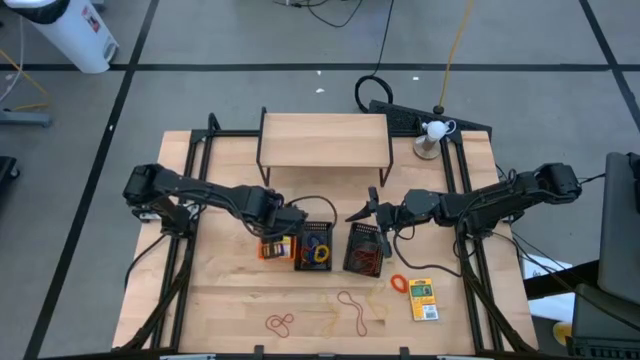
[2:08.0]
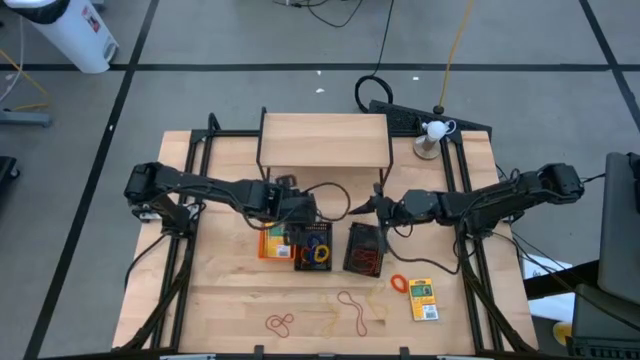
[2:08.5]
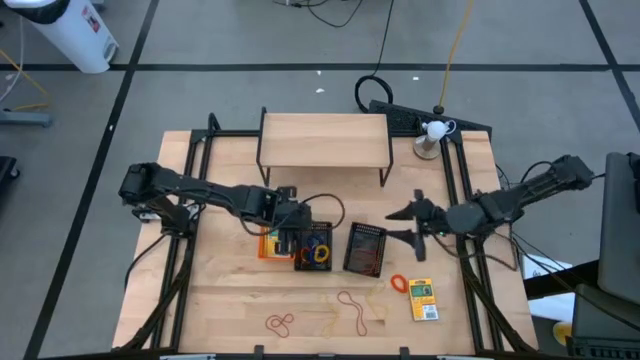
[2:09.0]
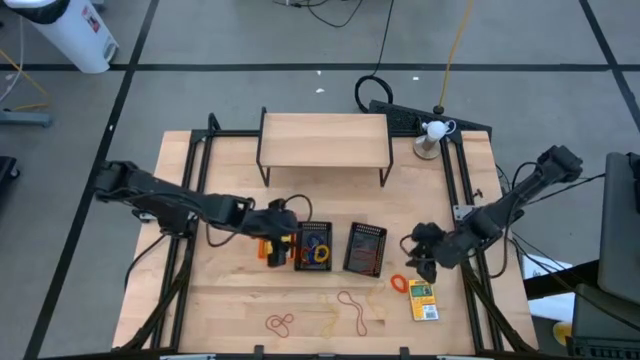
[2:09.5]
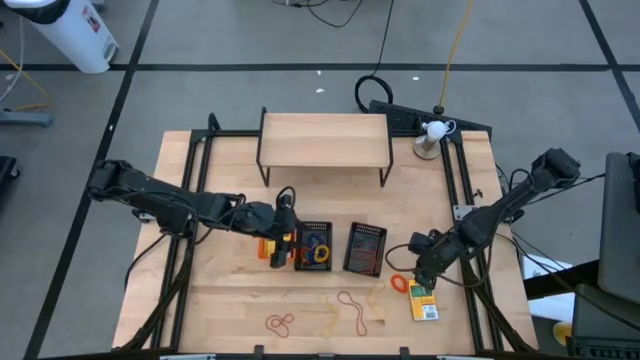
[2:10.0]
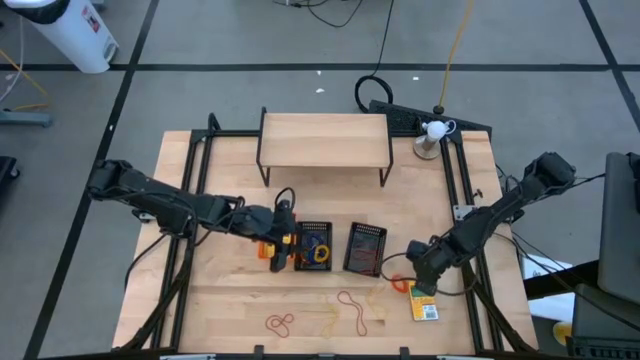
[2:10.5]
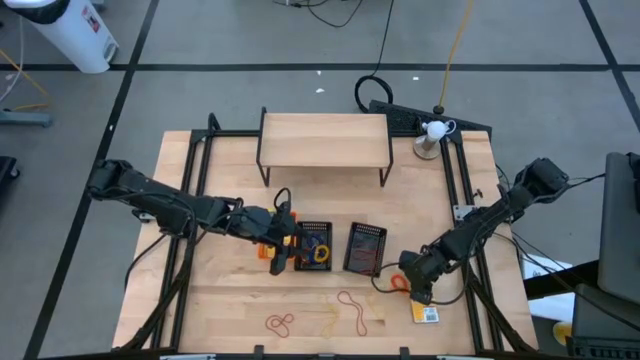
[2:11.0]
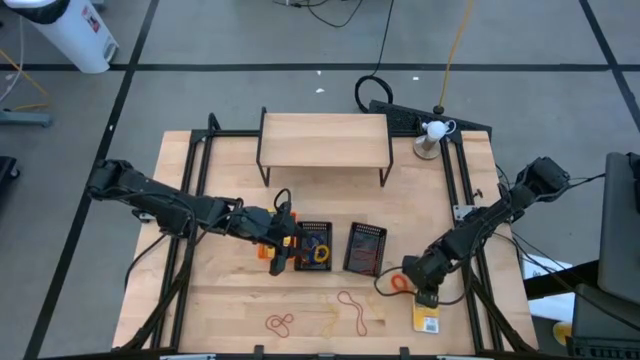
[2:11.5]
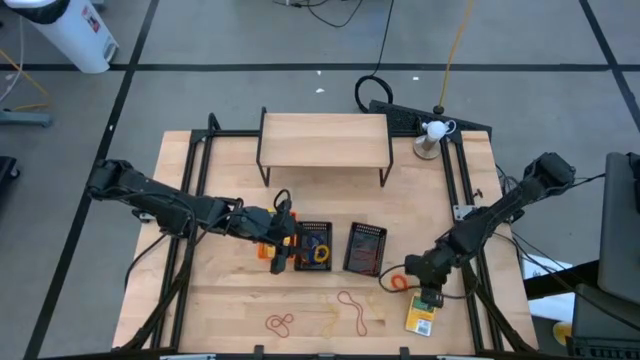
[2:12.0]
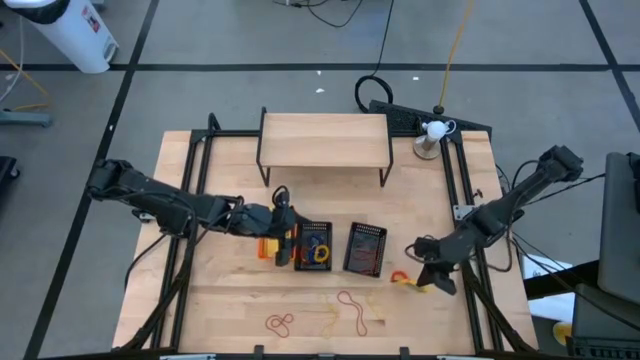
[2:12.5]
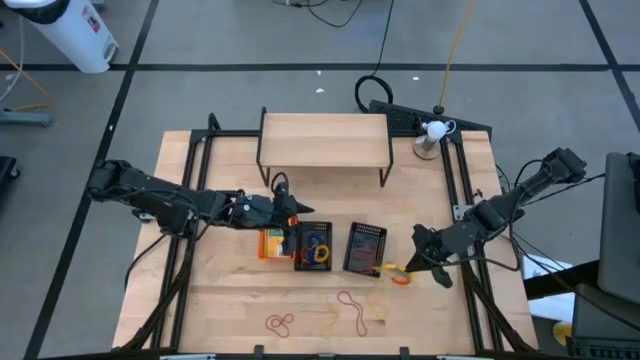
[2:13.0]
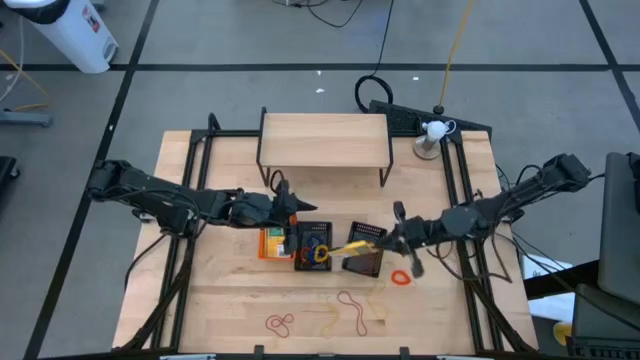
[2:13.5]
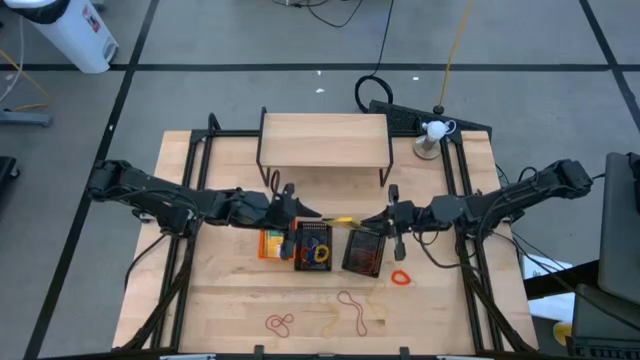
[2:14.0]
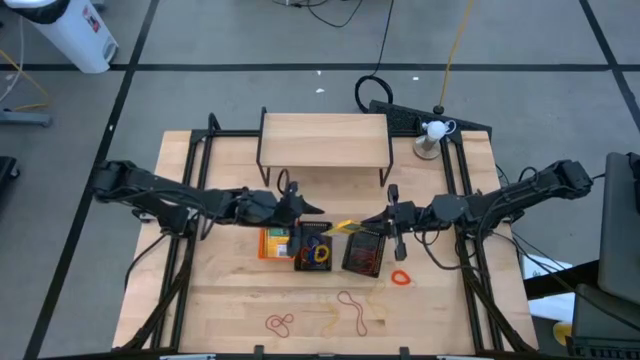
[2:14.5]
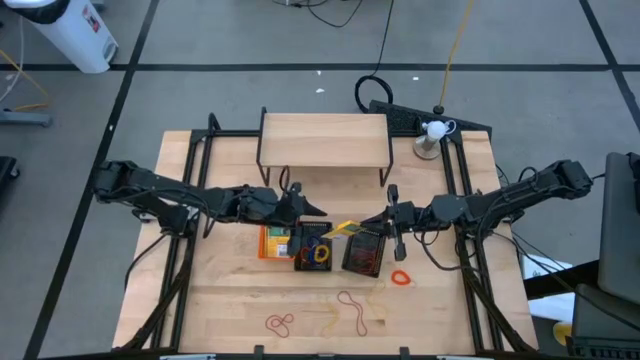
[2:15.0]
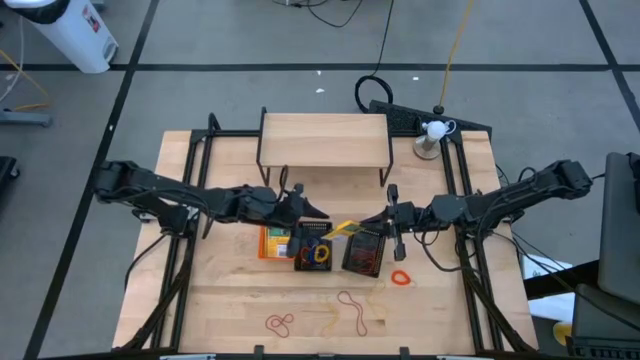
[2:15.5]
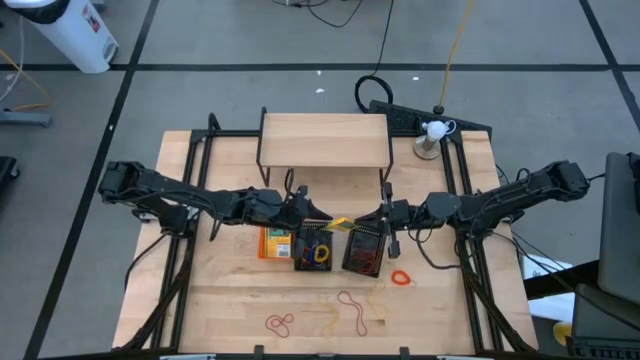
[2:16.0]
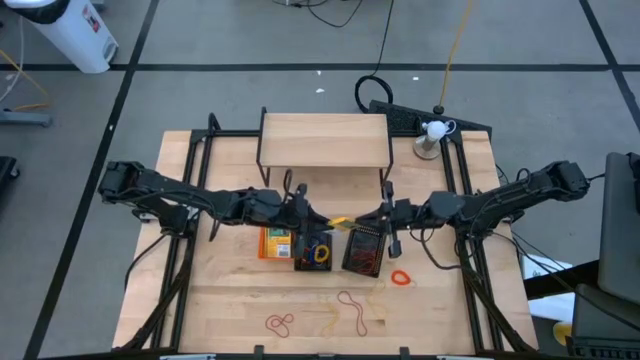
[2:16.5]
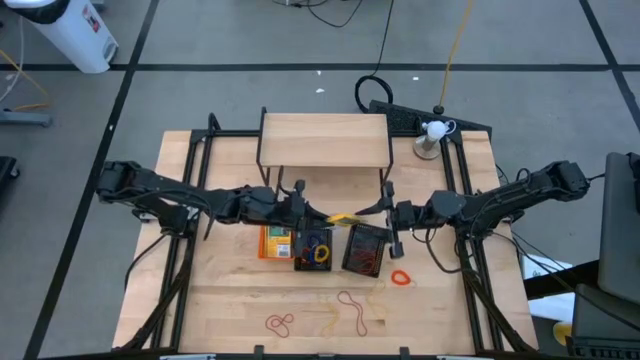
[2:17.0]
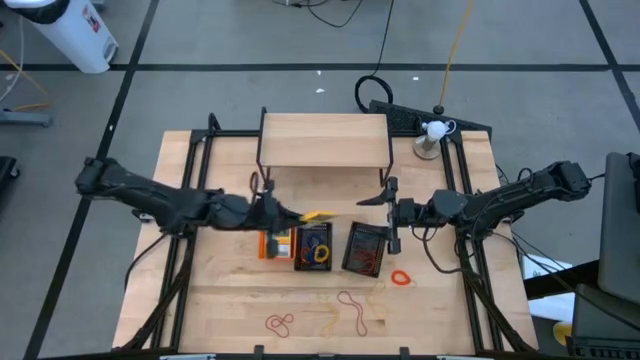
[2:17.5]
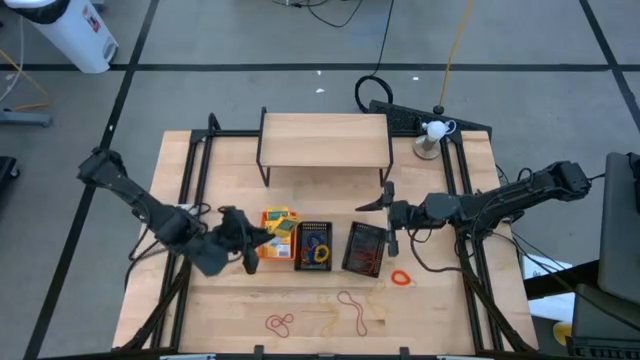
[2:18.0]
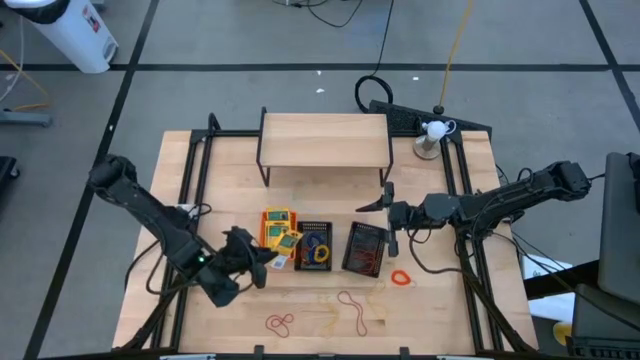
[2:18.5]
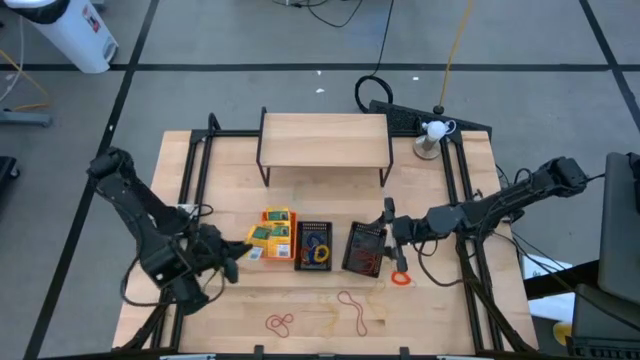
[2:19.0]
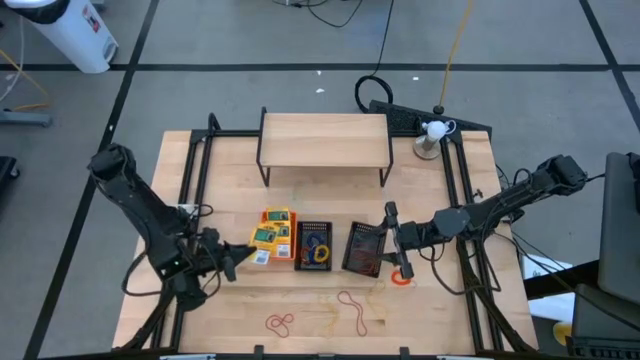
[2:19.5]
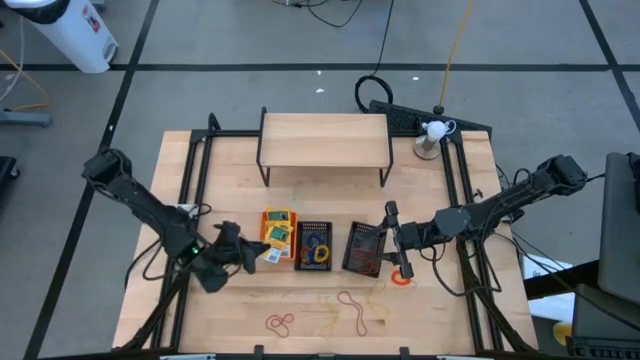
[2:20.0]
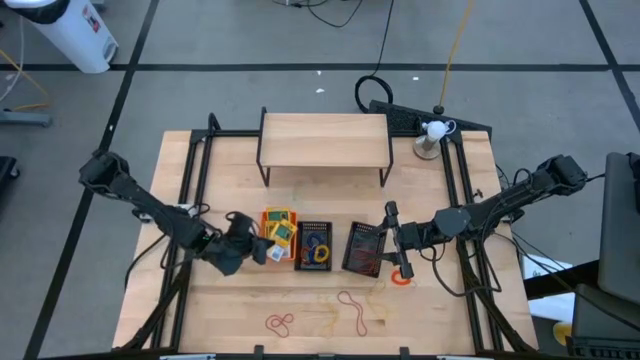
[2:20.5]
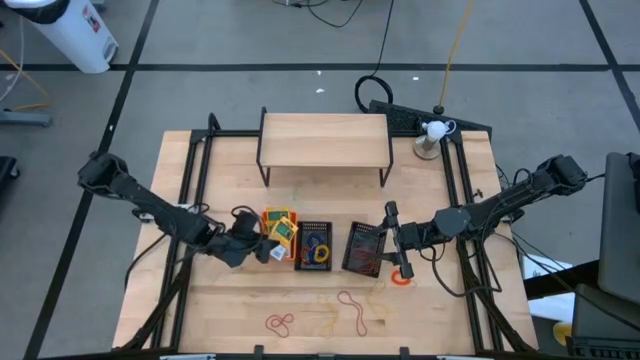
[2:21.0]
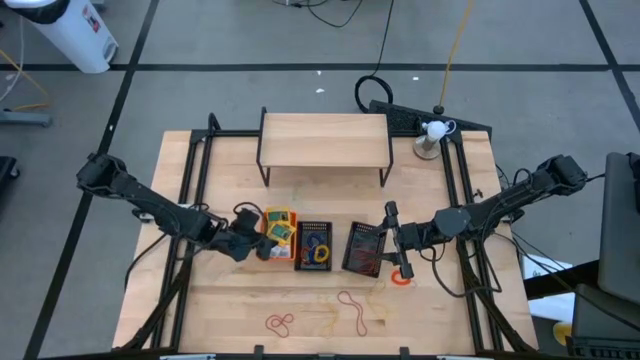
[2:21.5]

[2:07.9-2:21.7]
Task: Pick & Place Office Desk Supplies
Put the crayons box into the orange bin

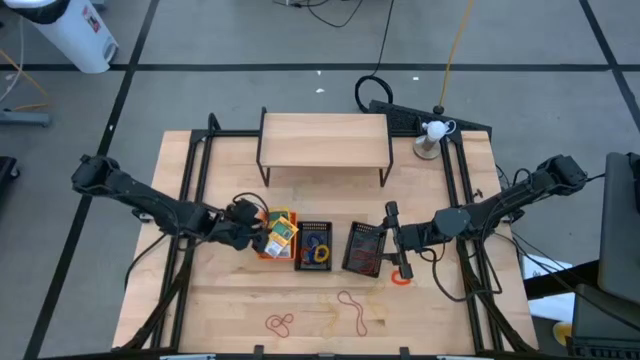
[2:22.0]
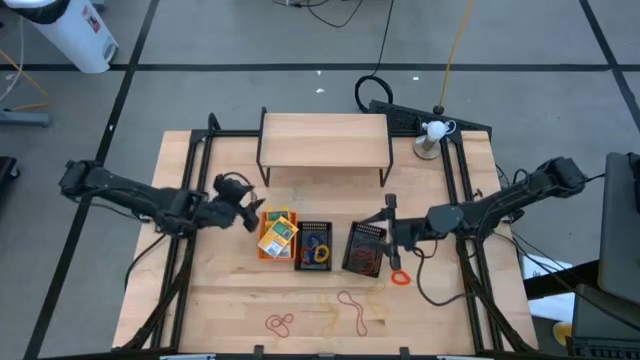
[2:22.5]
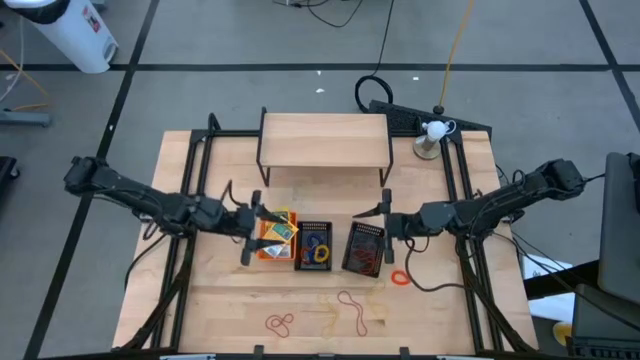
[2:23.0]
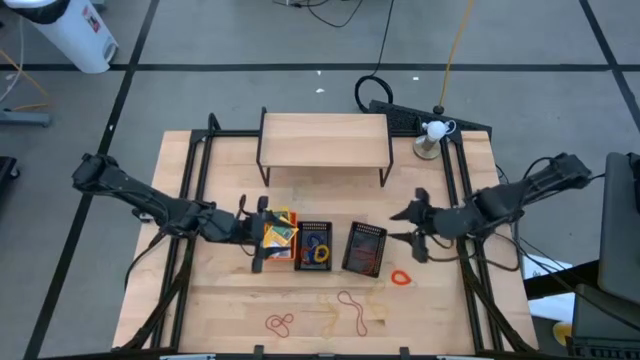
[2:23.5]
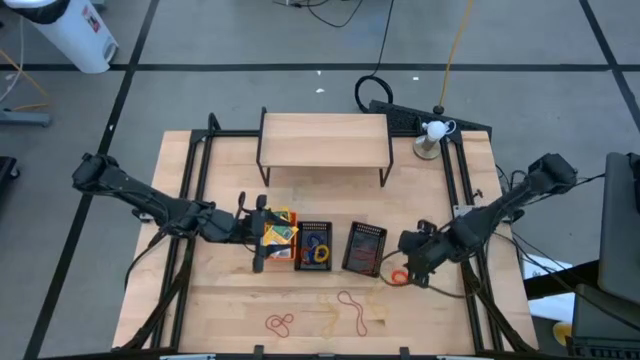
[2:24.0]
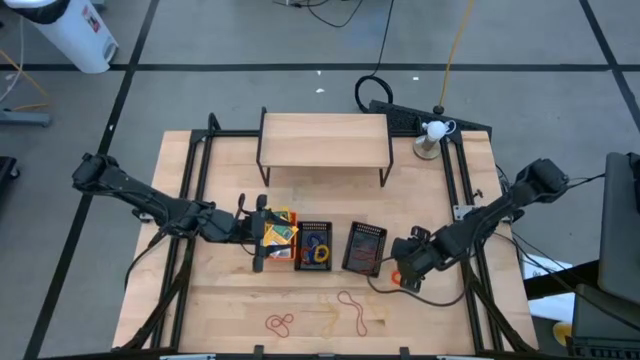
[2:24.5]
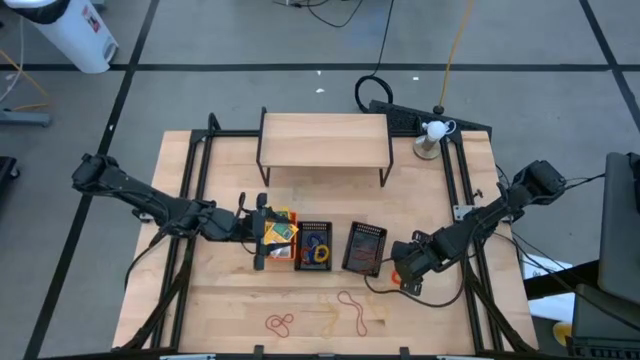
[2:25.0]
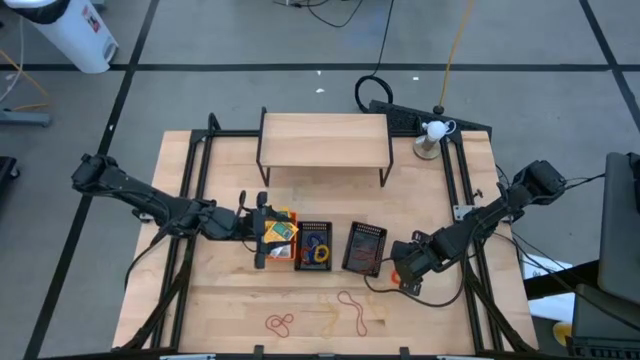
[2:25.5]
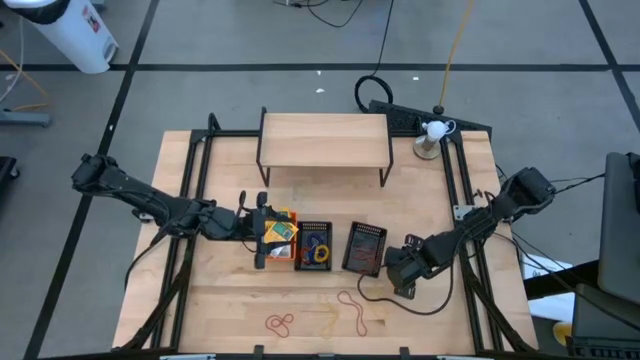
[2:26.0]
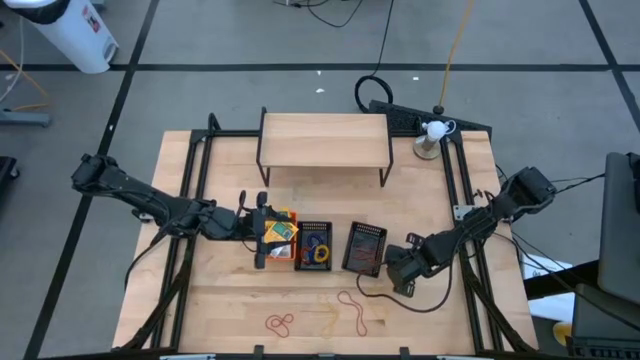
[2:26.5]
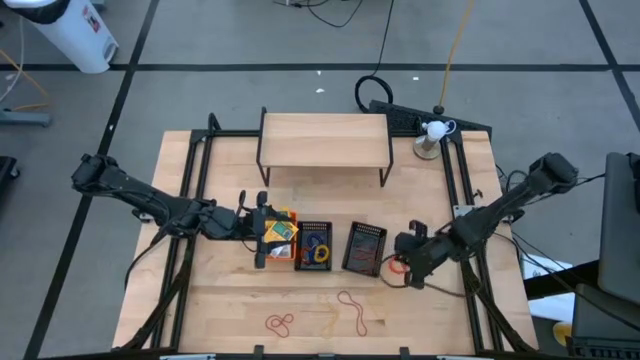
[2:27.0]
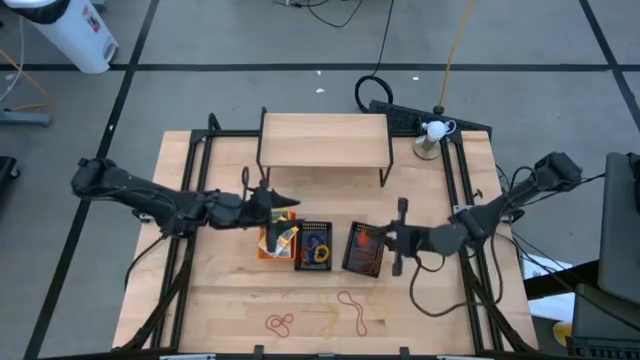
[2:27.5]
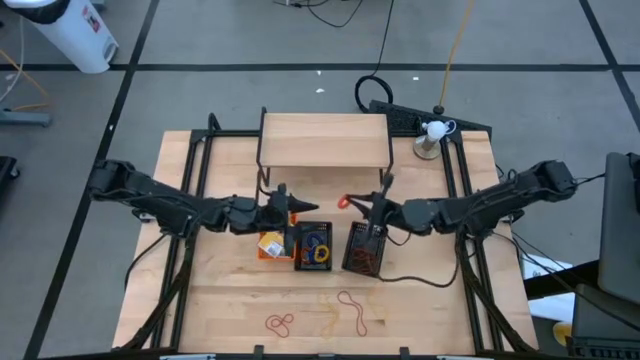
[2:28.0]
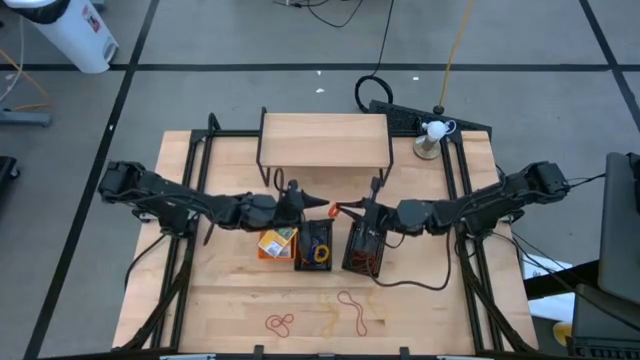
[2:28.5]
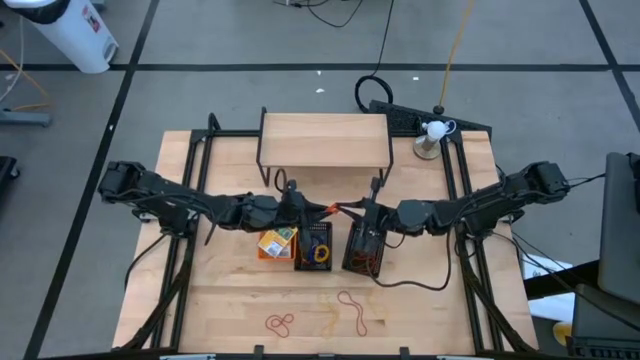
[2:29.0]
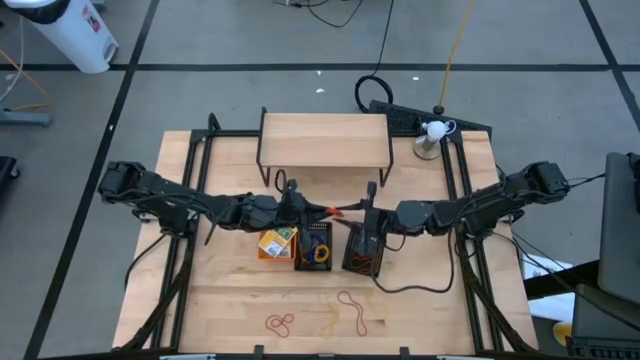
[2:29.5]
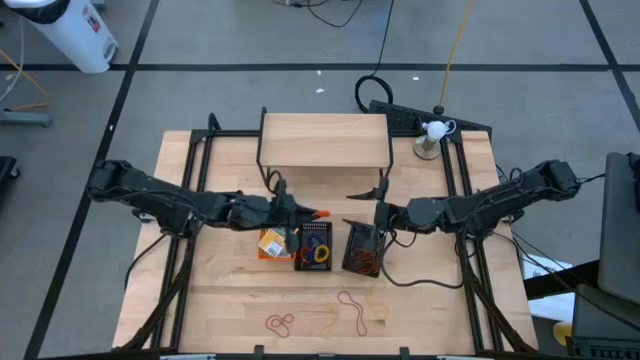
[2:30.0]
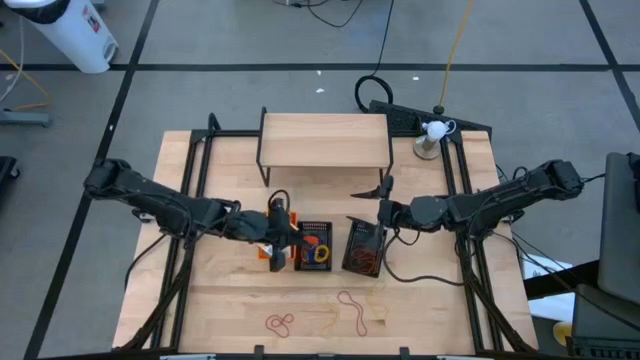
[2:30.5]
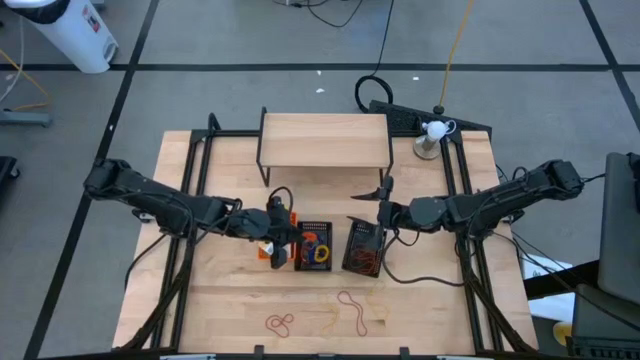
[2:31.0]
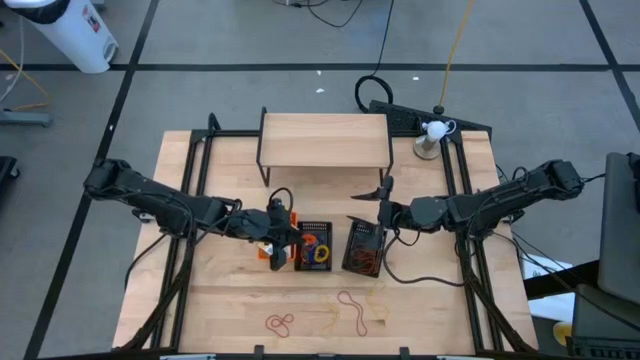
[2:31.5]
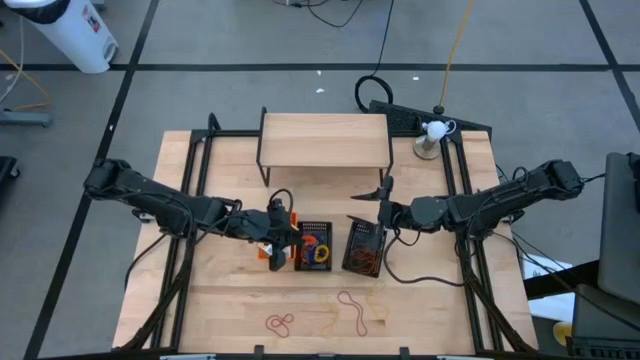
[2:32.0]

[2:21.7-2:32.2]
Put the orange spring rubber band into the left black bin
